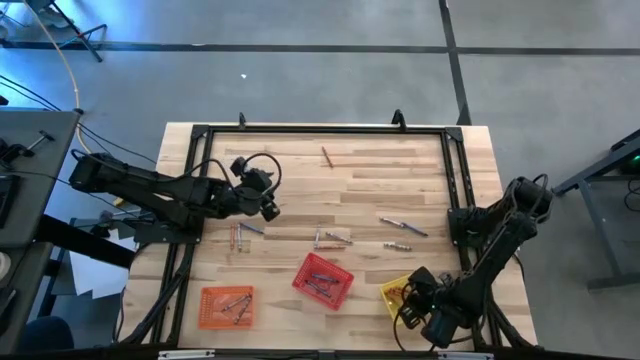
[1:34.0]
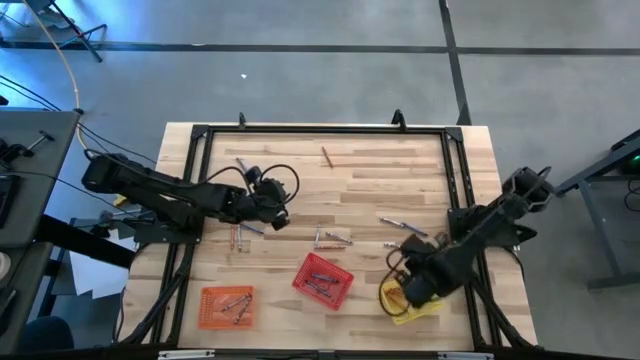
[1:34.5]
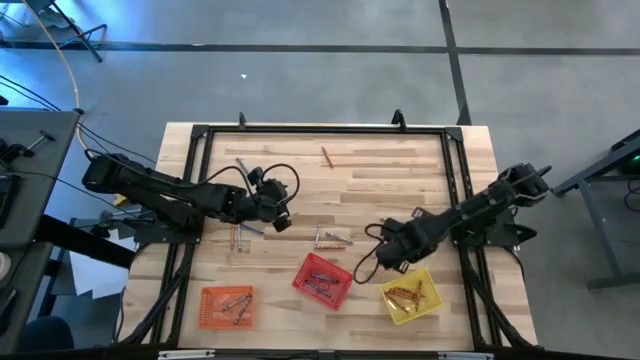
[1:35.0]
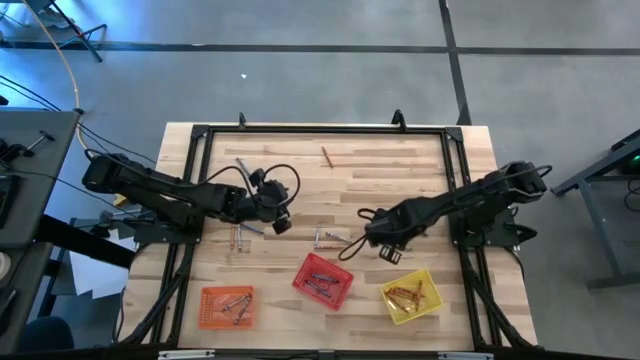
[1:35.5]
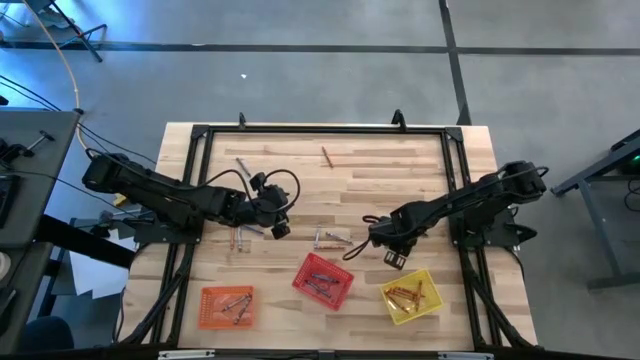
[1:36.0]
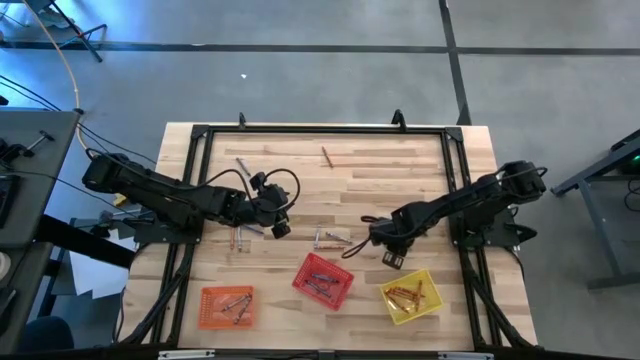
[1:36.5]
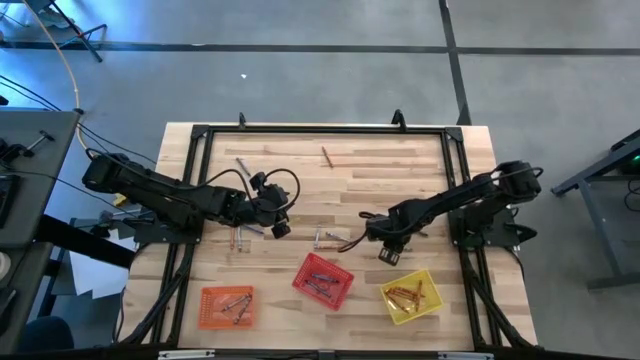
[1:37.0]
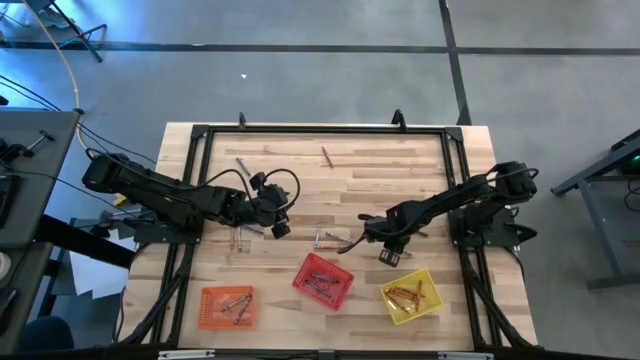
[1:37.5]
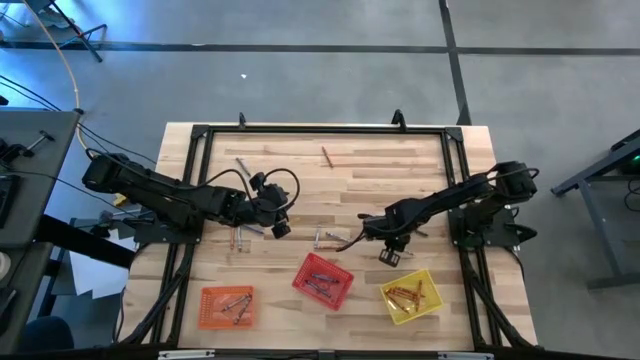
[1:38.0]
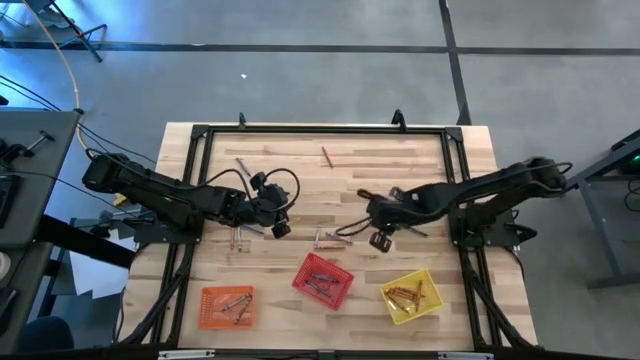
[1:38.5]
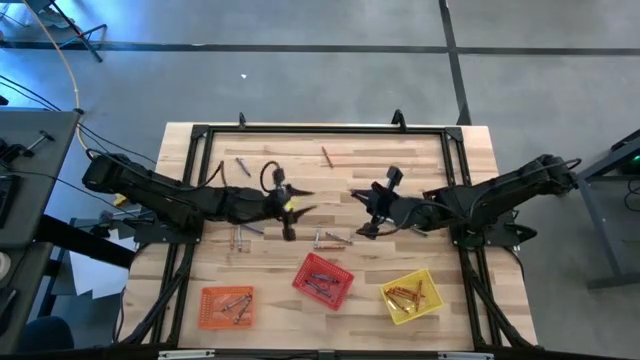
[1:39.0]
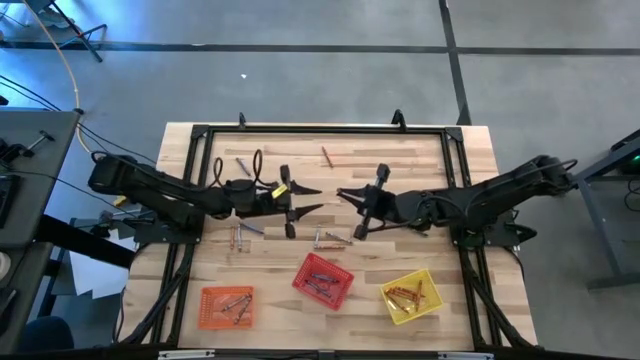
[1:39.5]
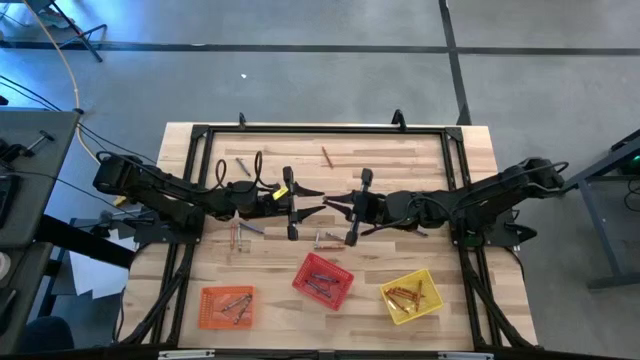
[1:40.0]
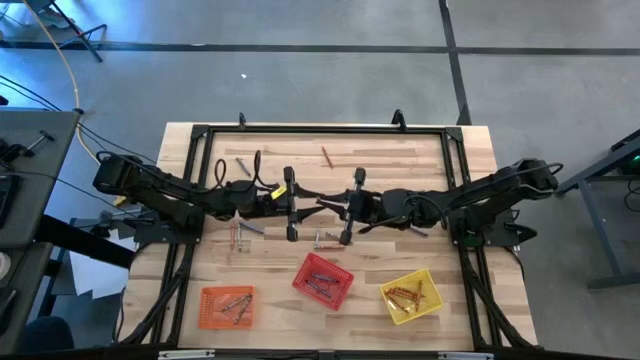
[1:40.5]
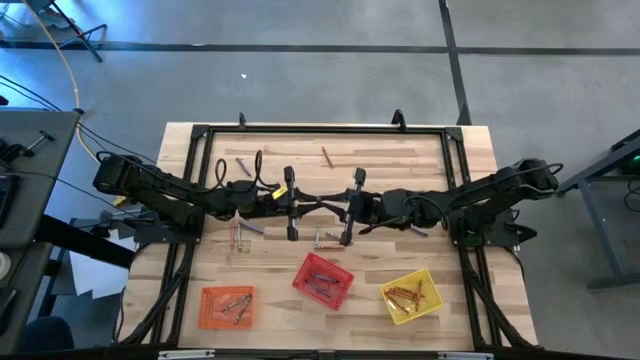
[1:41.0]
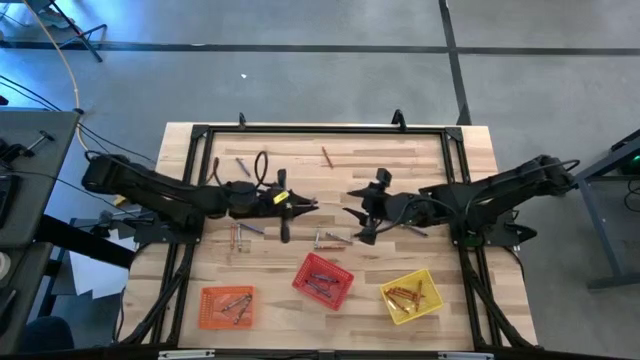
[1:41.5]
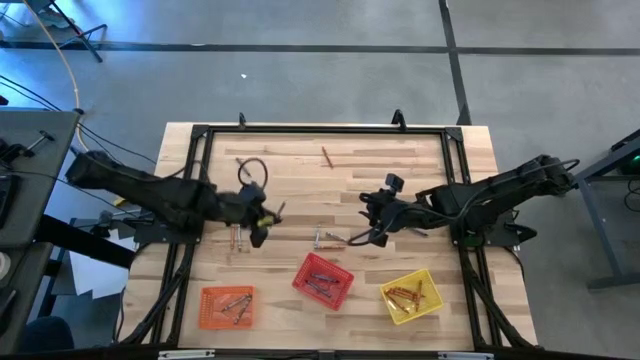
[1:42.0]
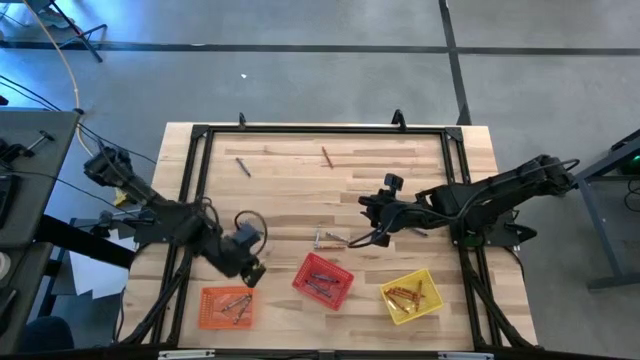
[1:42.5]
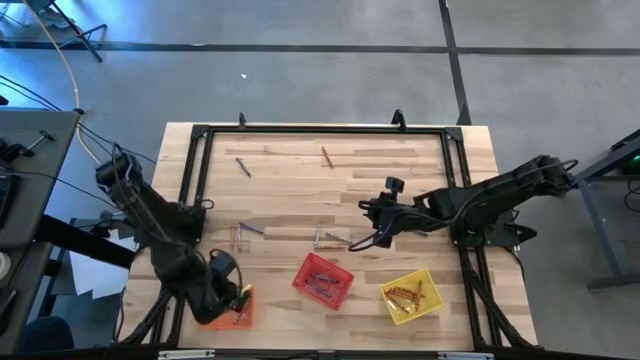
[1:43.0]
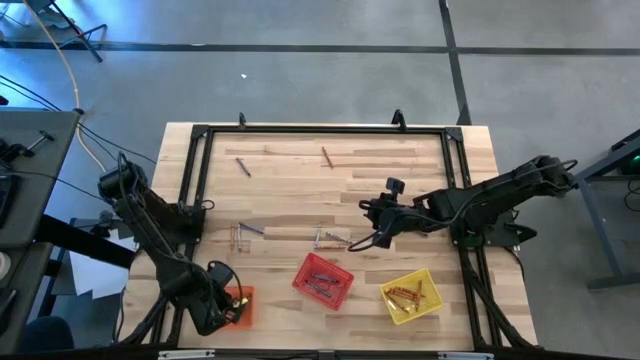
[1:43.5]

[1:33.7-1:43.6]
Task: Sort crayons
Put the gray crayon into the orange bin

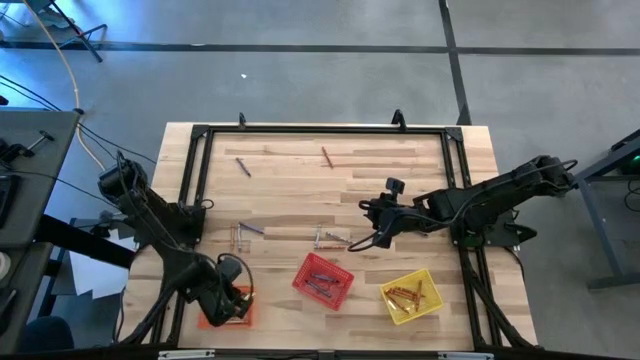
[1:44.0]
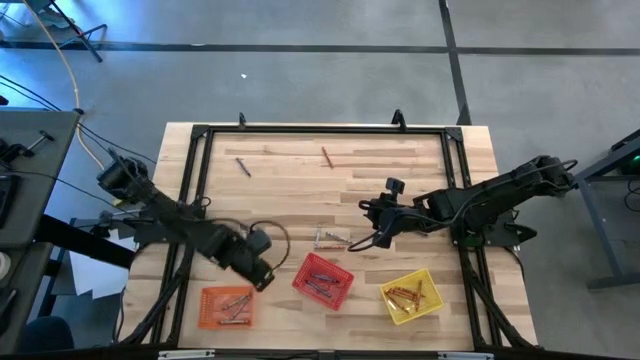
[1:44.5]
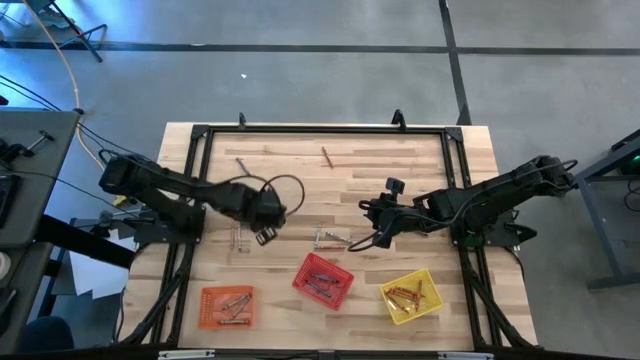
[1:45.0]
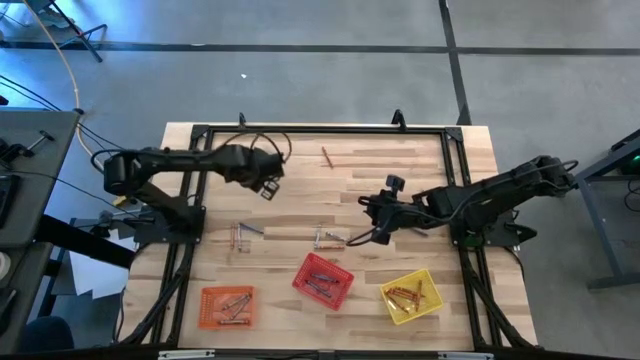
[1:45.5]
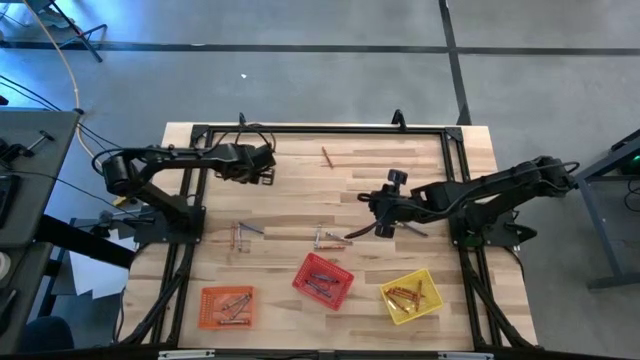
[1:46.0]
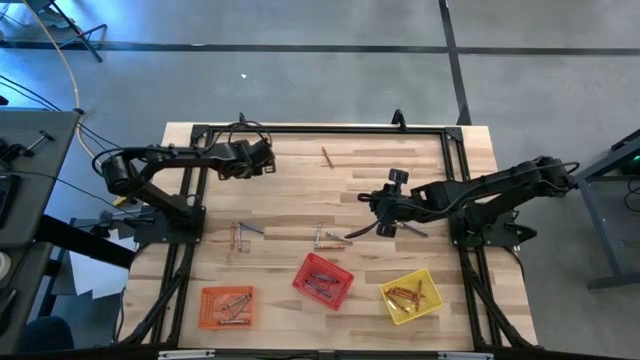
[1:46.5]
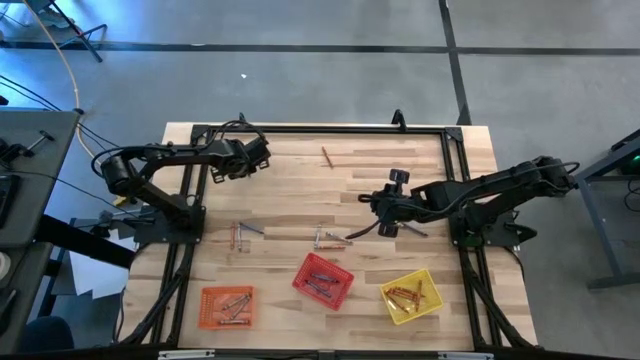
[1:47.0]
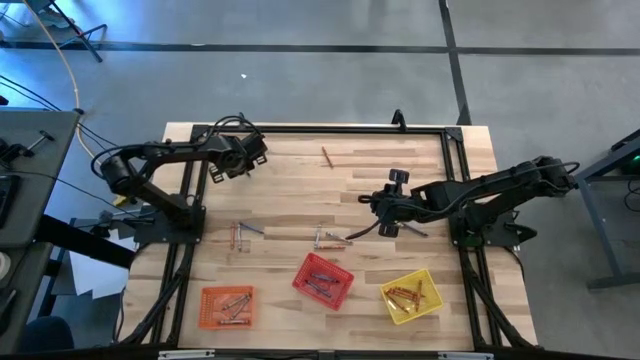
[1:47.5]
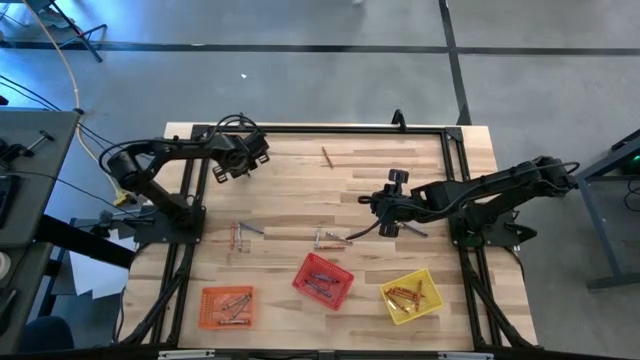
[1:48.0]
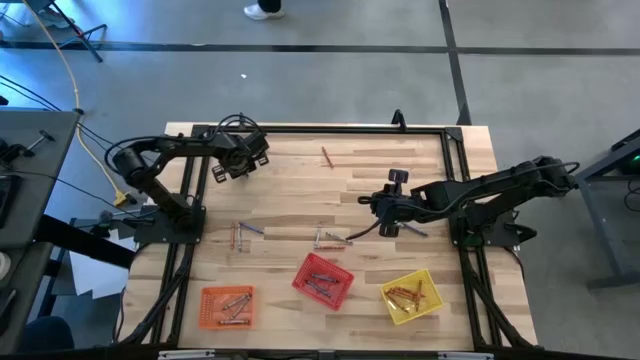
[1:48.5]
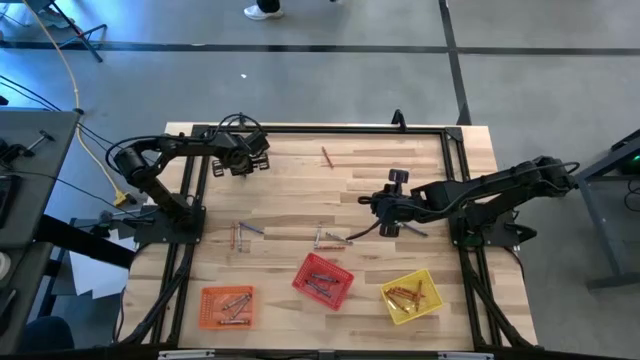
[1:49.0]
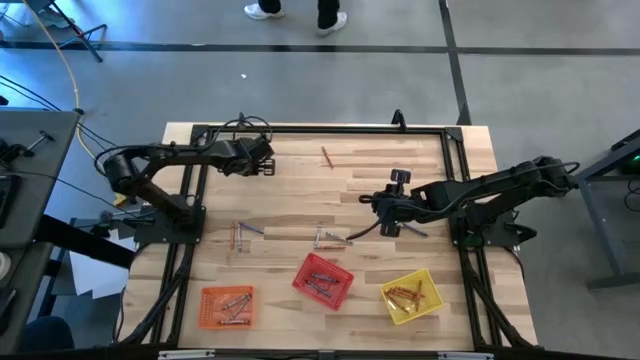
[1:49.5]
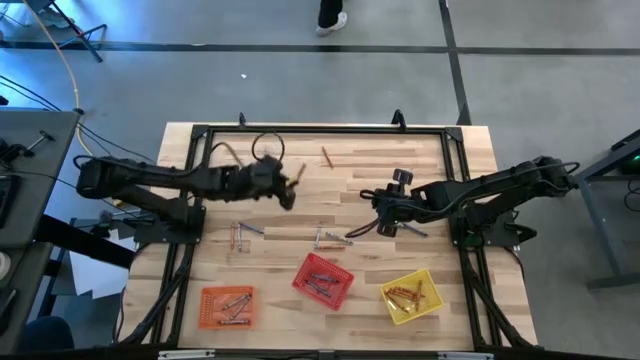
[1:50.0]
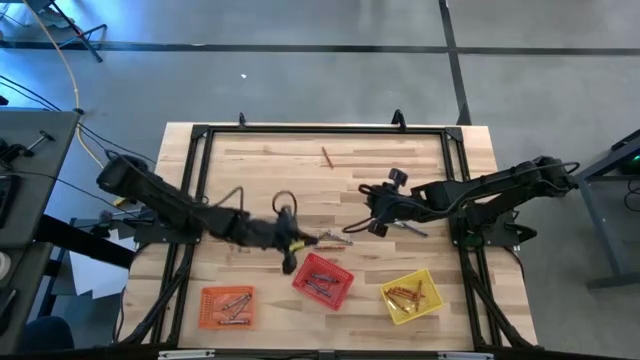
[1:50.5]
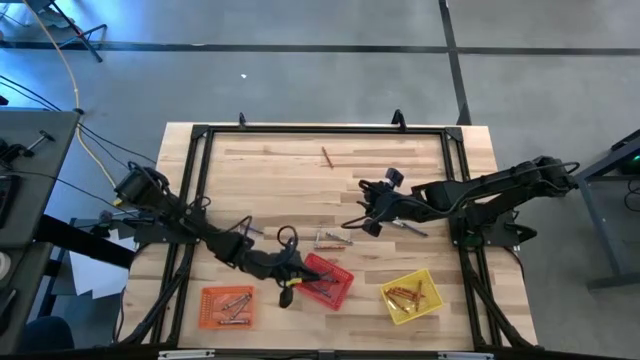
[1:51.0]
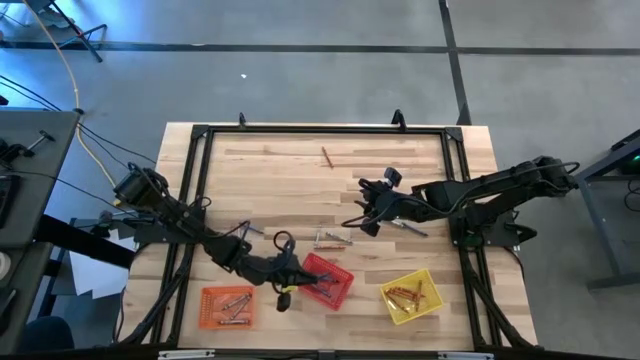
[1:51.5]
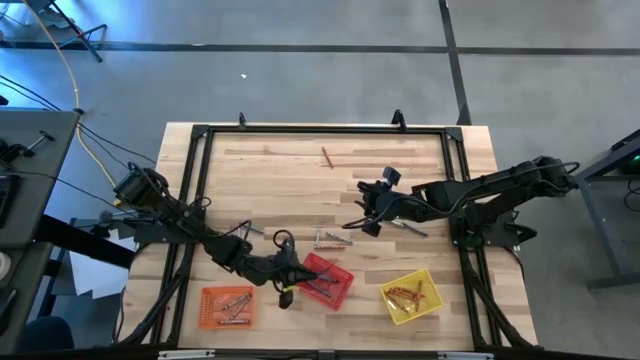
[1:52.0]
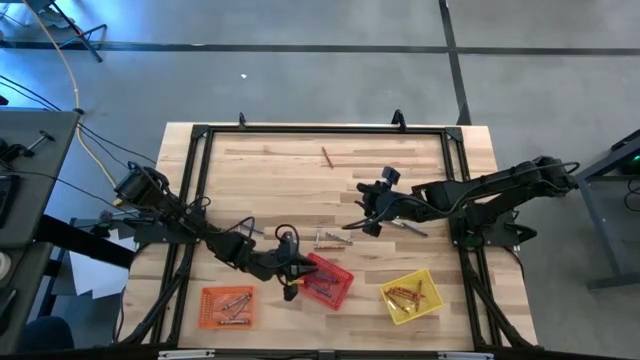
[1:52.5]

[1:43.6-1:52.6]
Put the blue crayon into the red bin

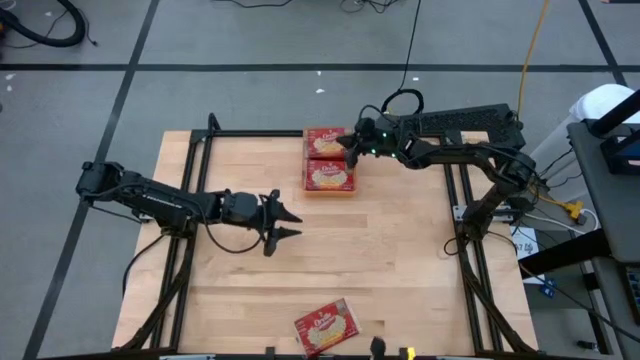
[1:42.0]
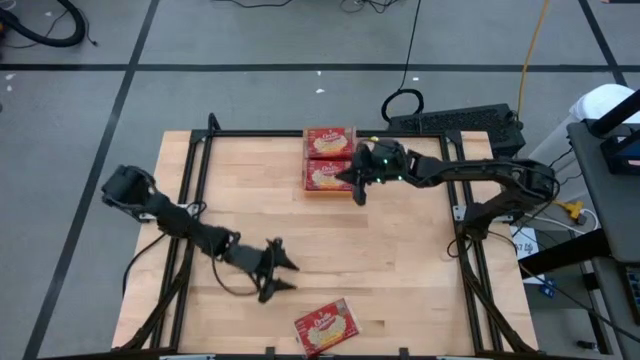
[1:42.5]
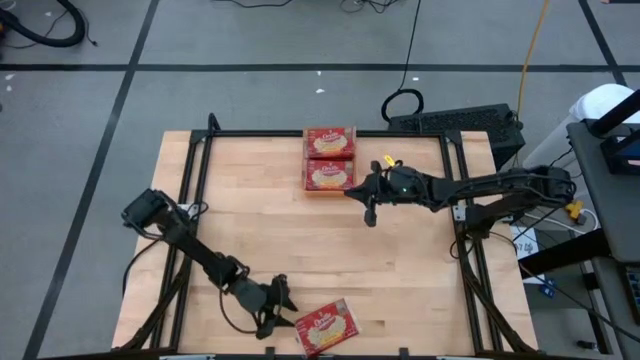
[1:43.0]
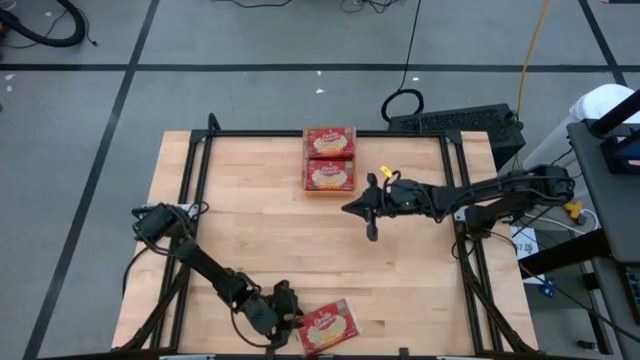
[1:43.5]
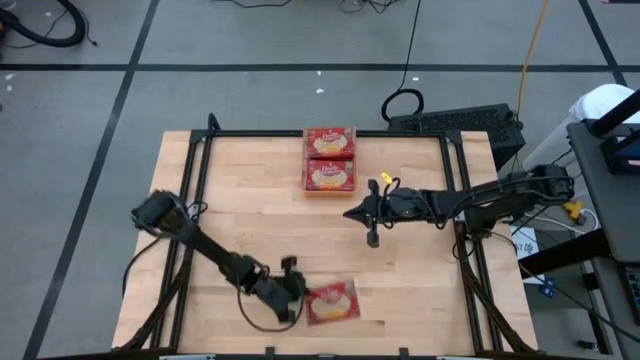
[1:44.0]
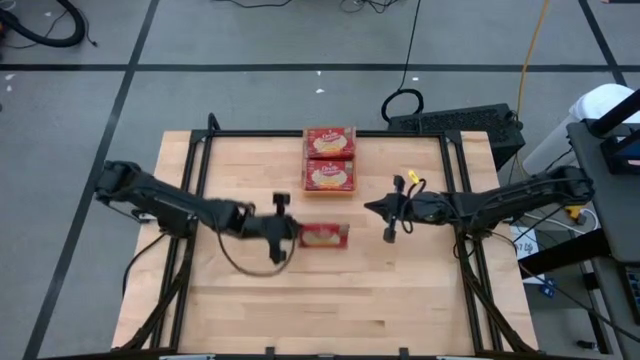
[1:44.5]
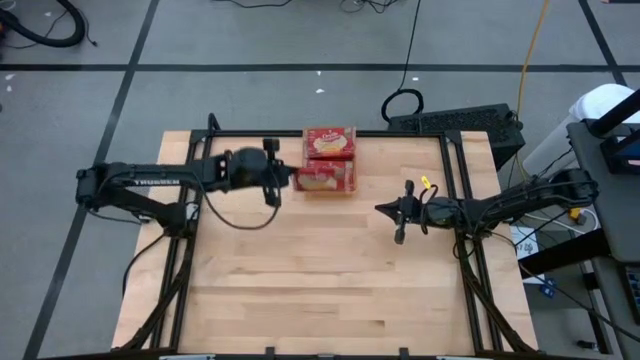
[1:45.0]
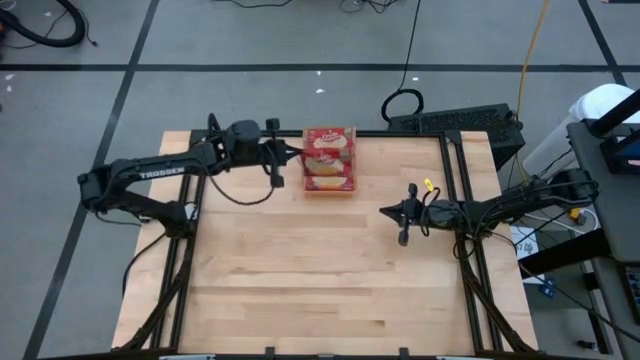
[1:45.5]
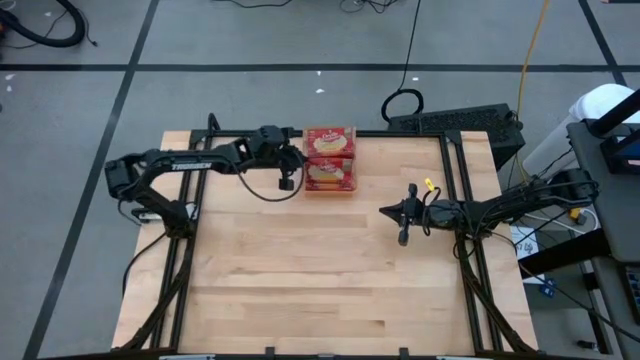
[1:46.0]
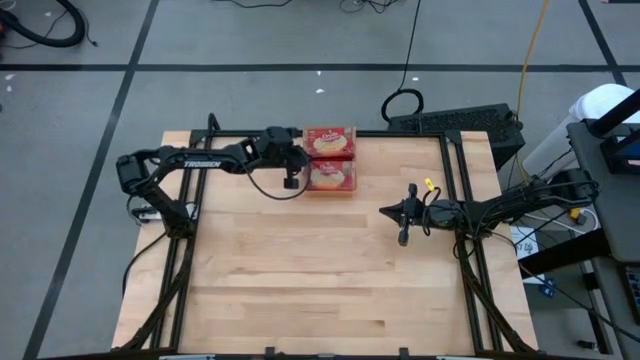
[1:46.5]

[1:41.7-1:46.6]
Task: Sort popcorn bags into baskets
Put the red popcorn bag into the orange bin
